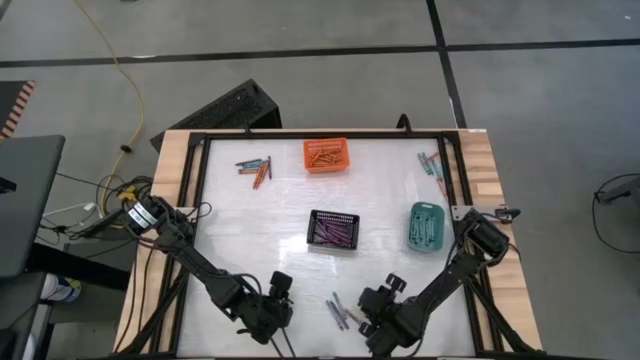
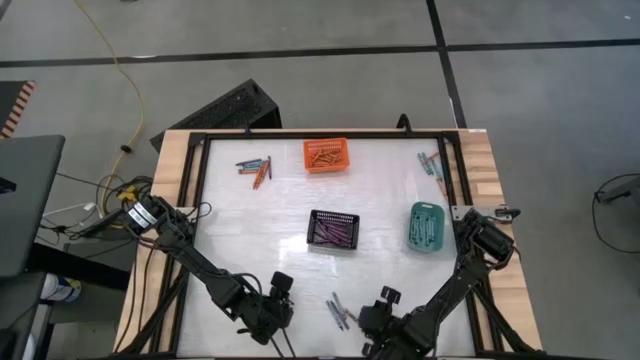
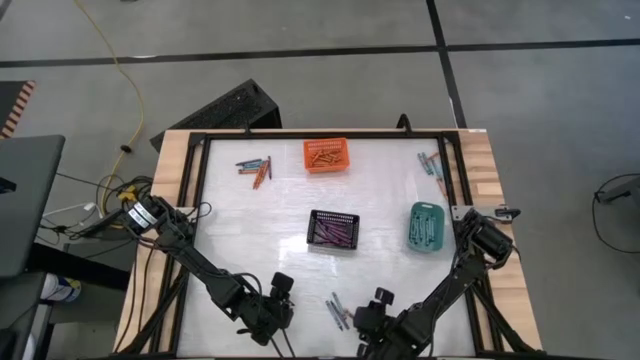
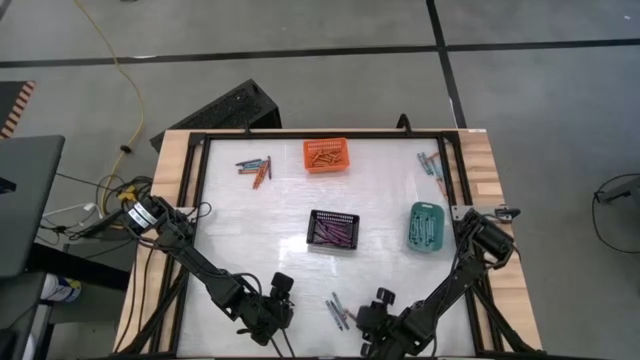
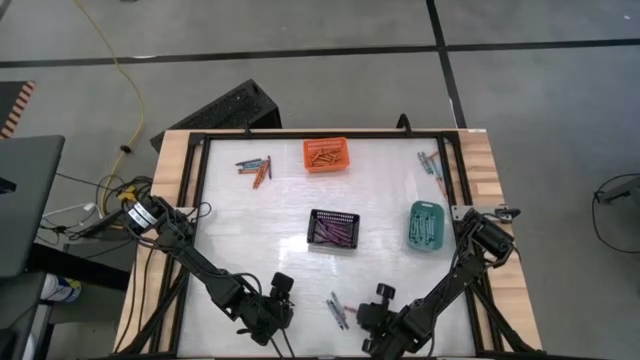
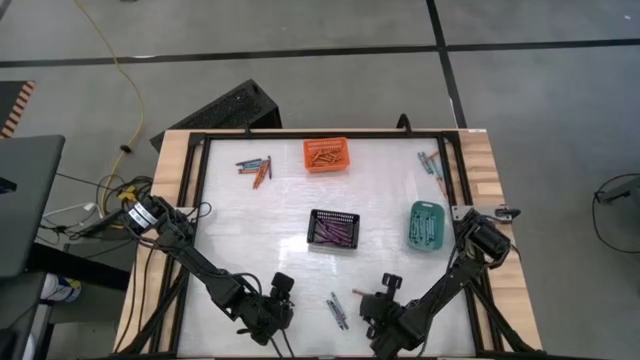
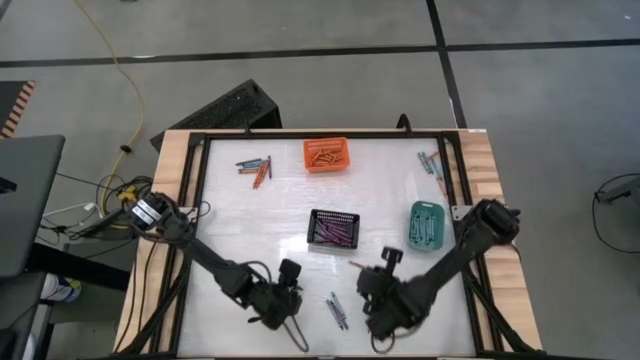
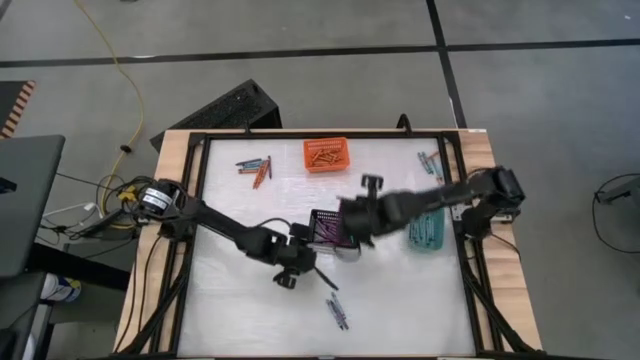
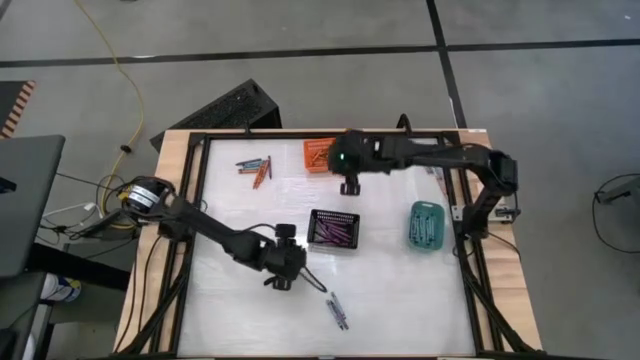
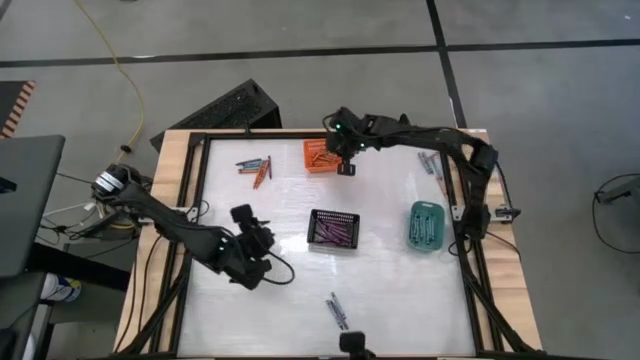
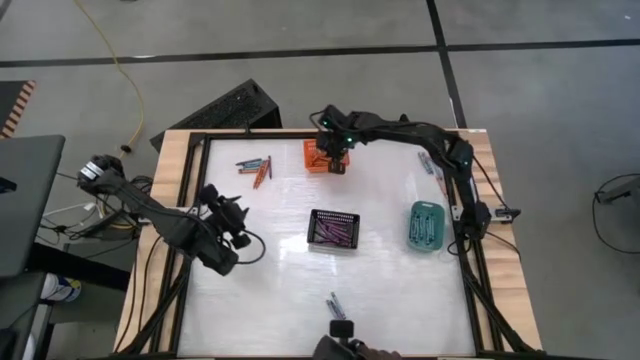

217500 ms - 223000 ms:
Task: Sort crayons
Put the orange crayon into the orange bin

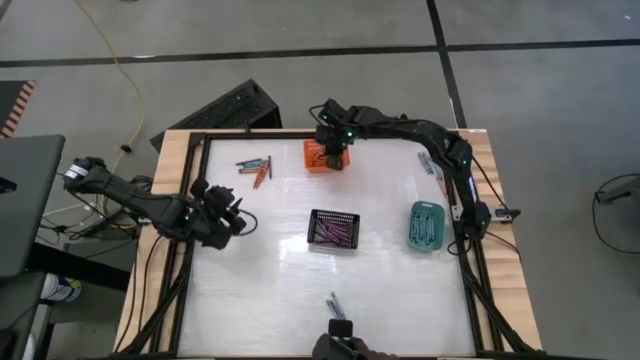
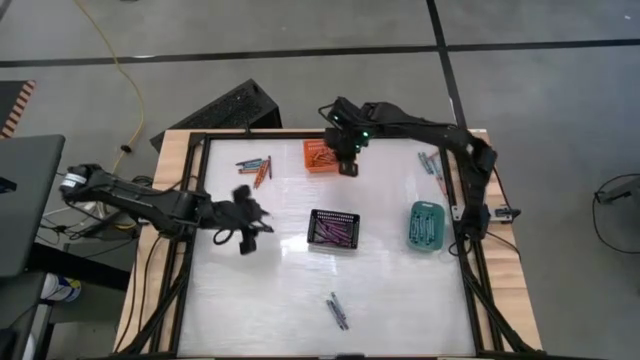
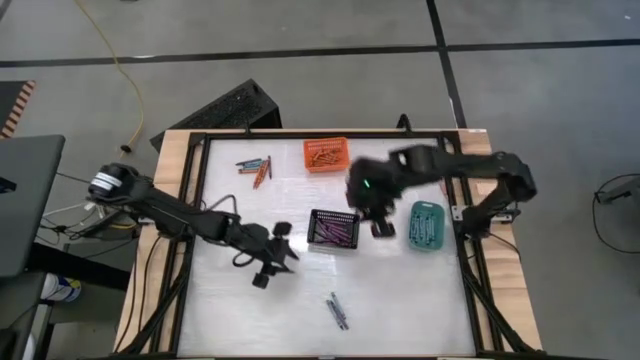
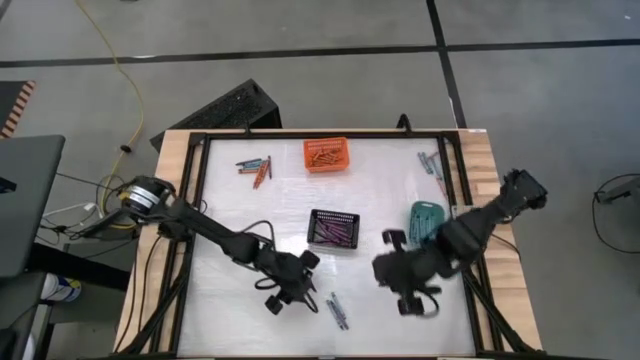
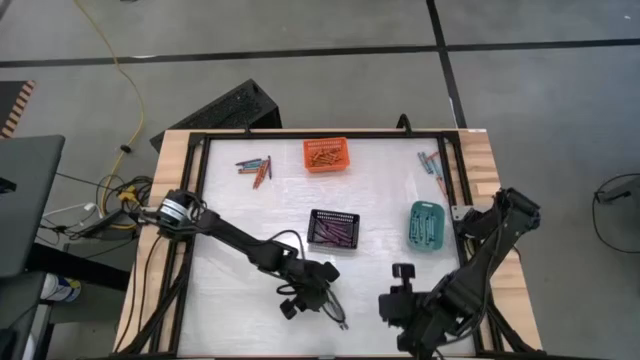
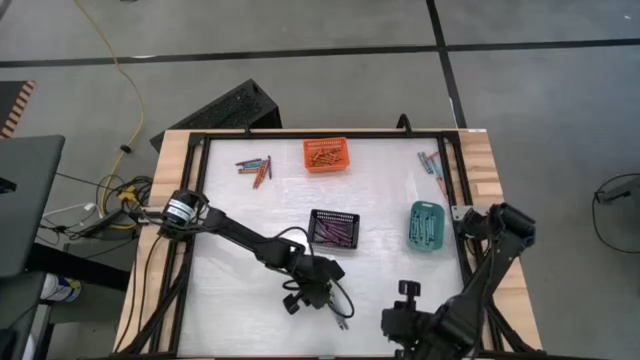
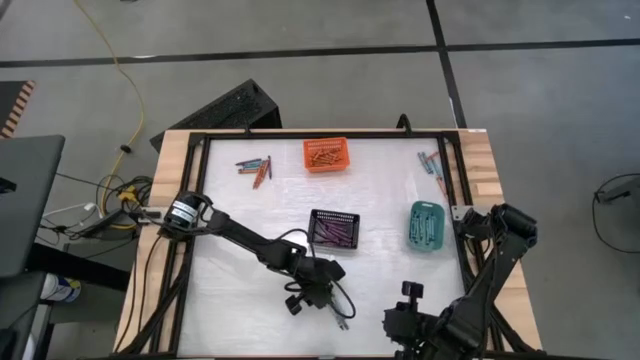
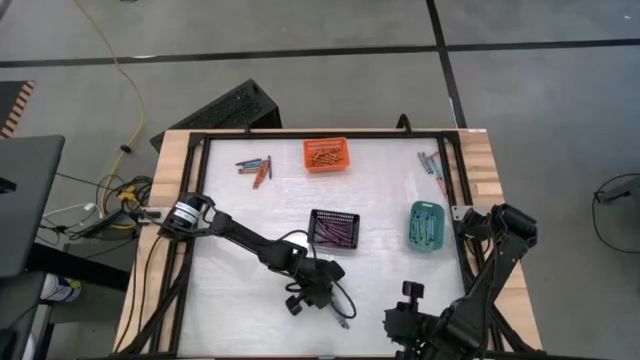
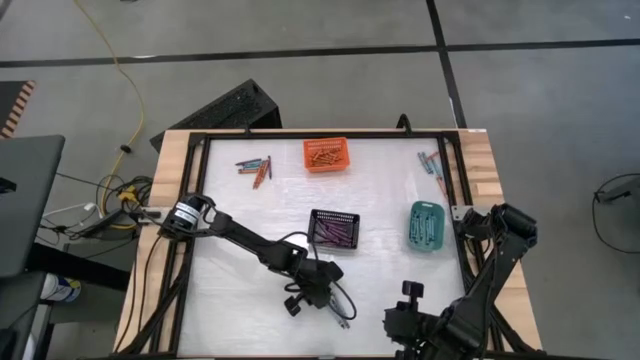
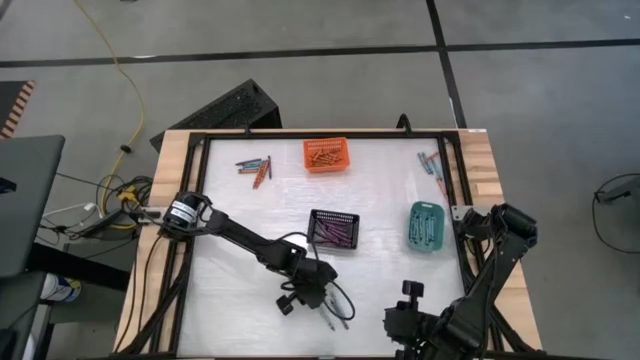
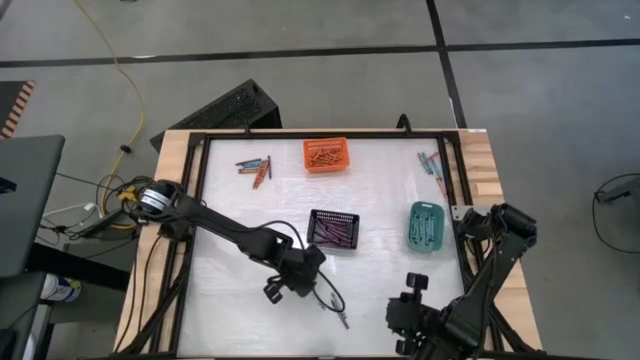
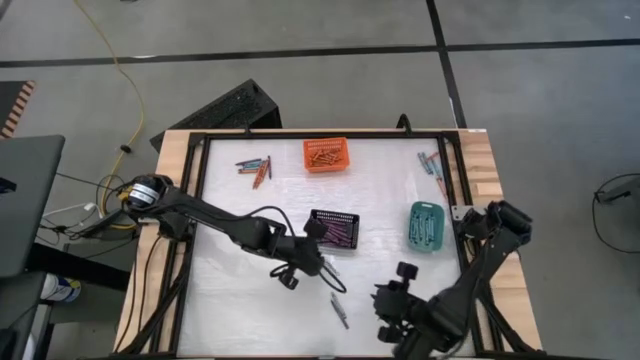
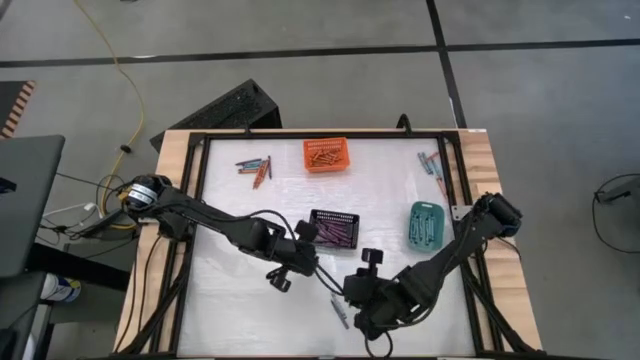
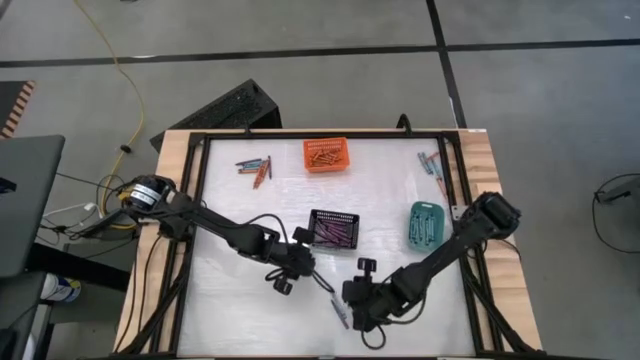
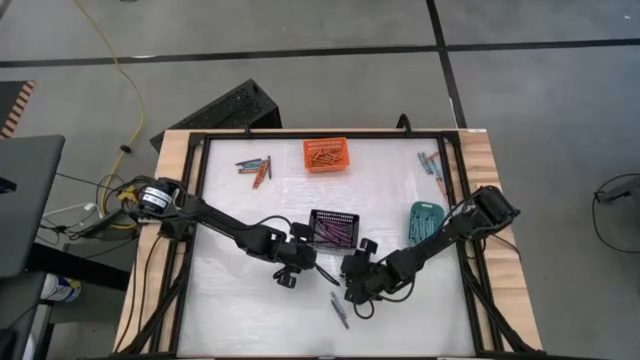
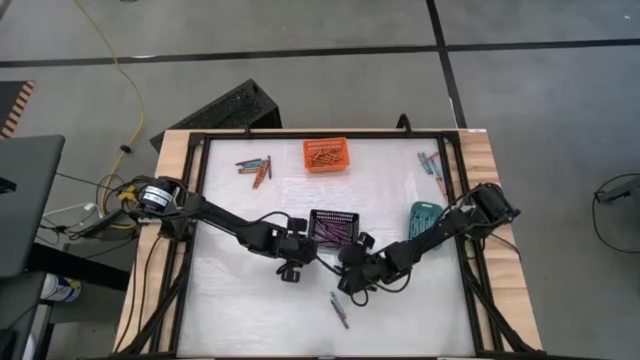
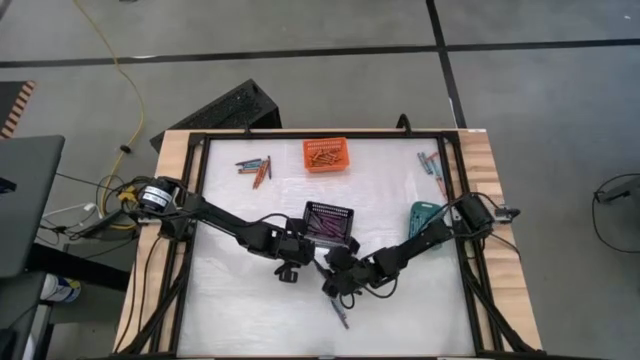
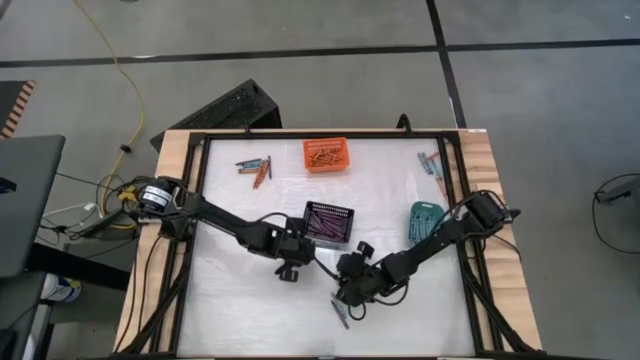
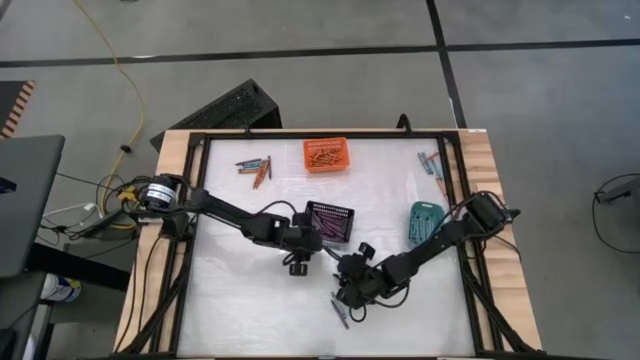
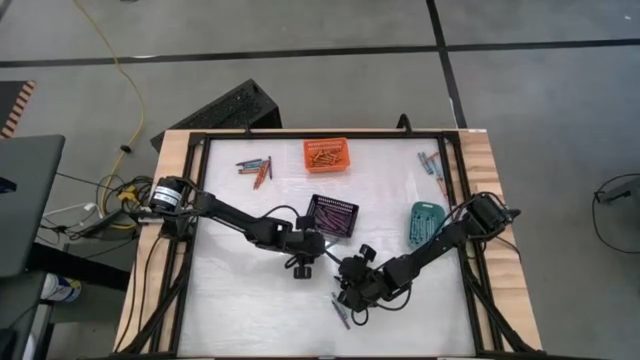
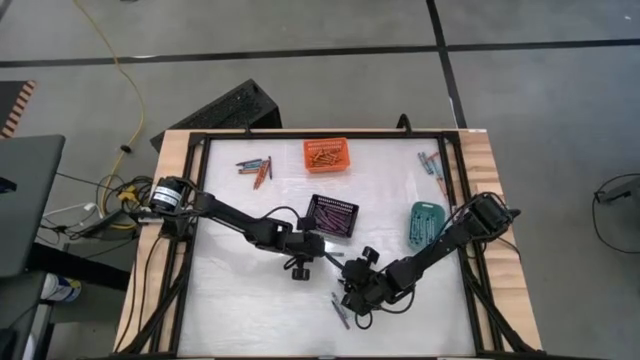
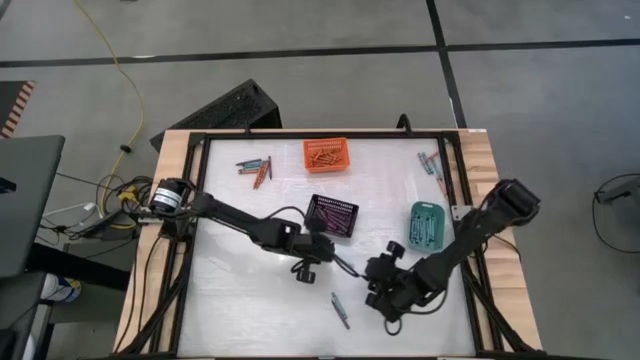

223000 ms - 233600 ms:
Put the blue green crayon into the green bin

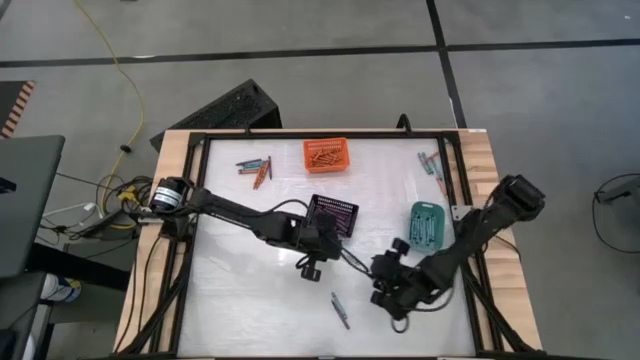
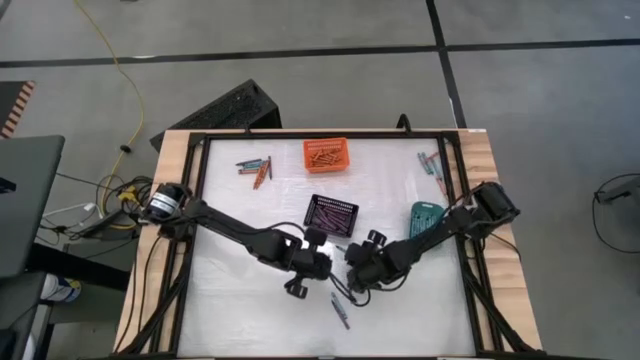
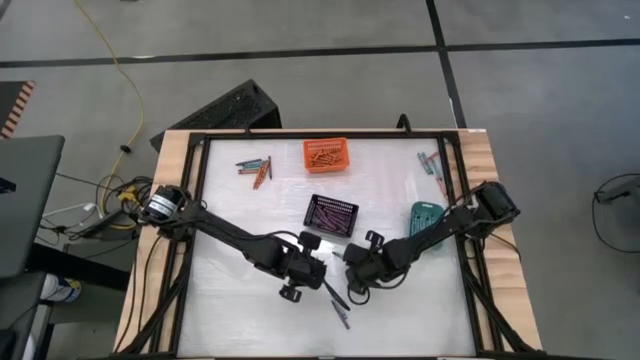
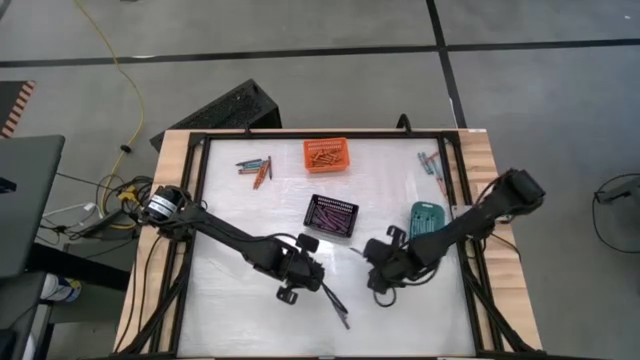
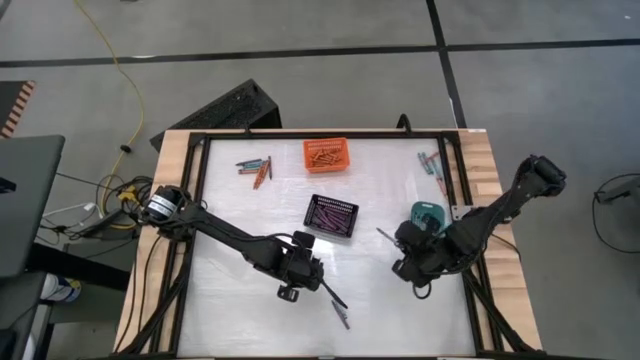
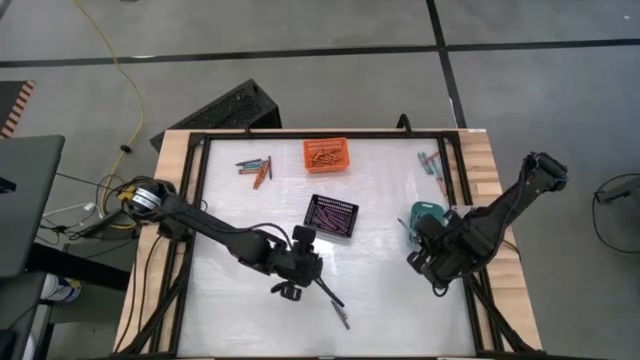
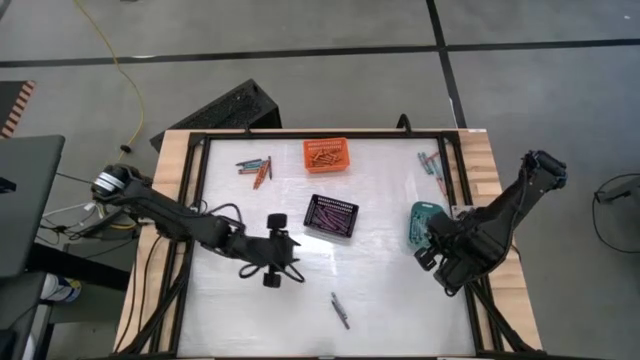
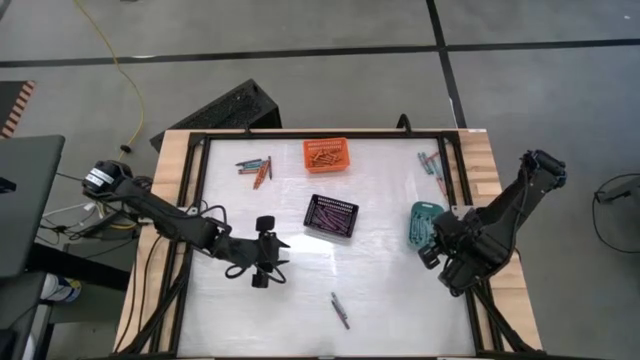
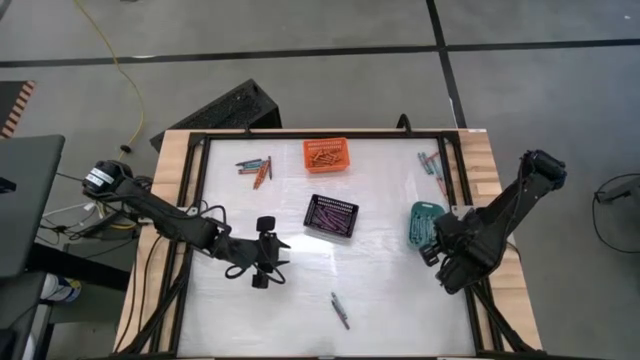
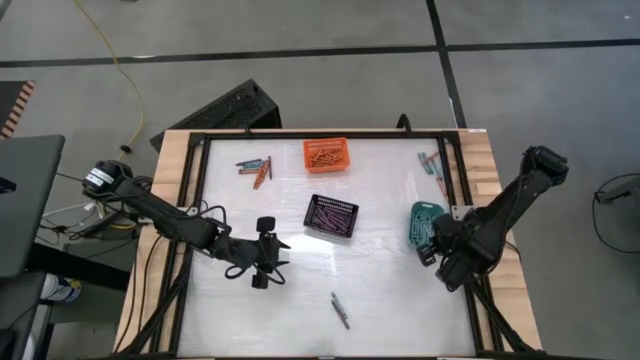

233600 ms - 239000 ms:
Put the blue green crayon into the green bin
